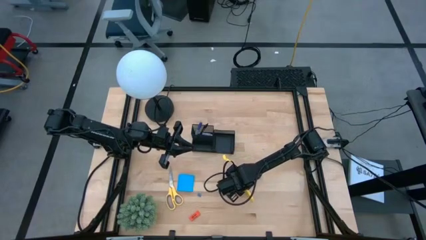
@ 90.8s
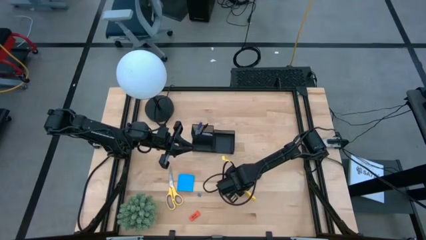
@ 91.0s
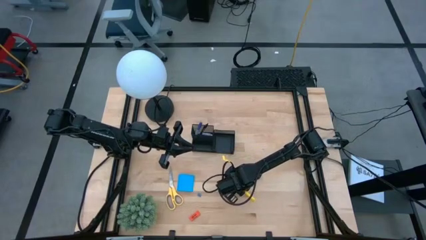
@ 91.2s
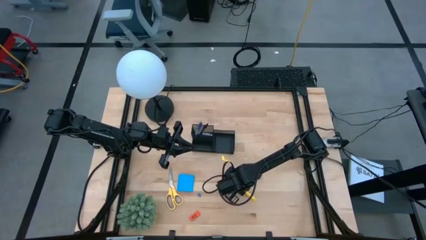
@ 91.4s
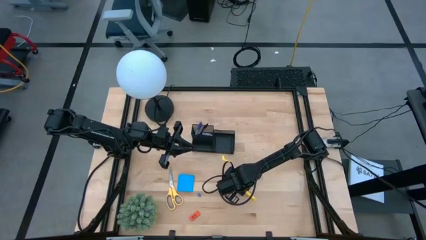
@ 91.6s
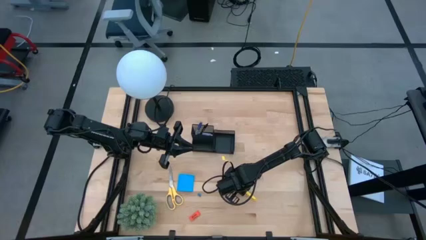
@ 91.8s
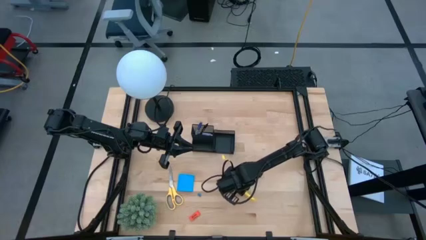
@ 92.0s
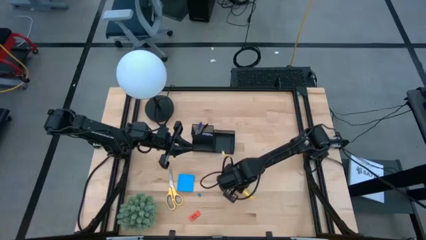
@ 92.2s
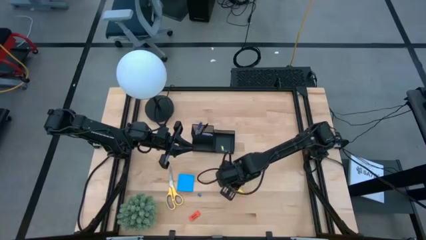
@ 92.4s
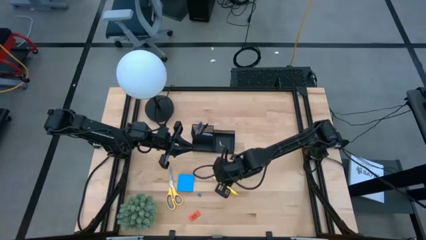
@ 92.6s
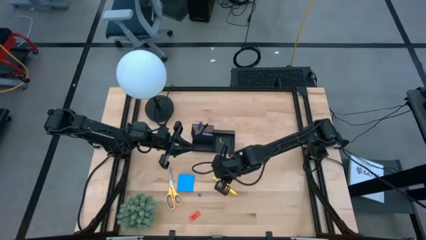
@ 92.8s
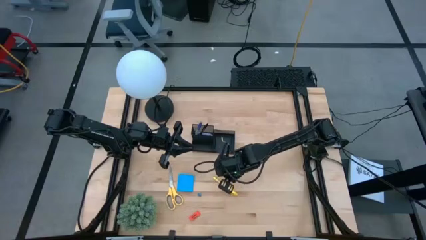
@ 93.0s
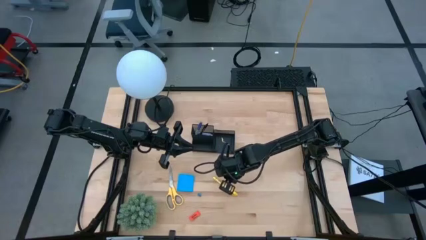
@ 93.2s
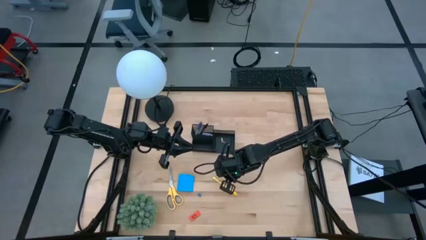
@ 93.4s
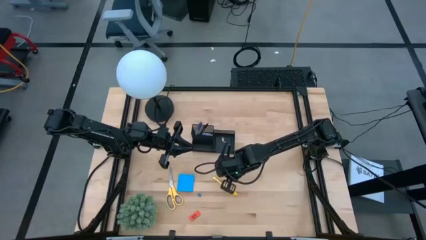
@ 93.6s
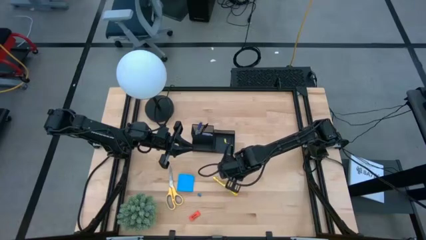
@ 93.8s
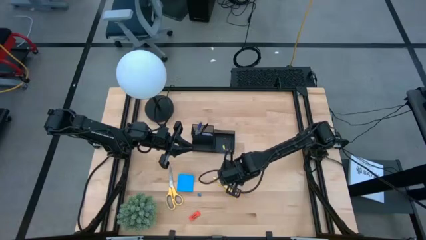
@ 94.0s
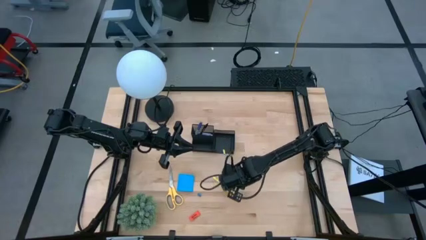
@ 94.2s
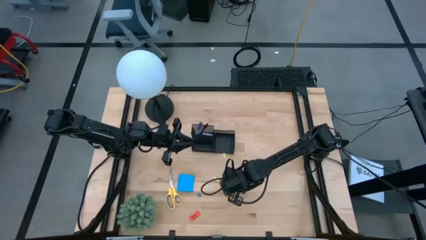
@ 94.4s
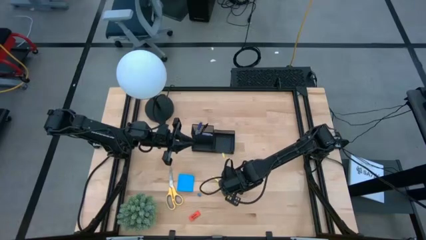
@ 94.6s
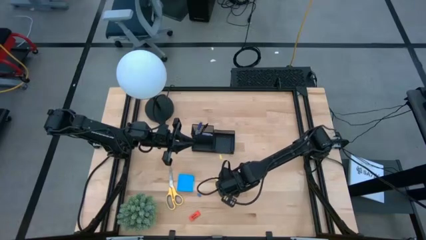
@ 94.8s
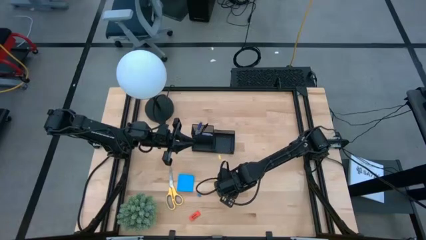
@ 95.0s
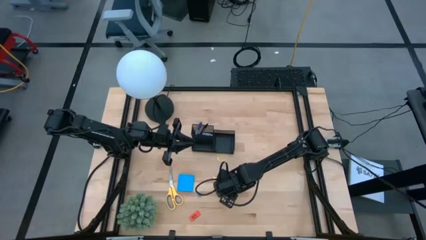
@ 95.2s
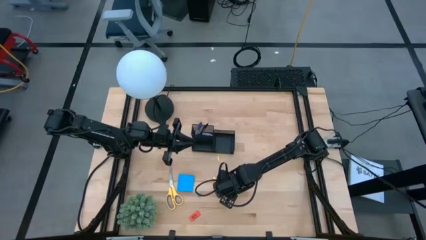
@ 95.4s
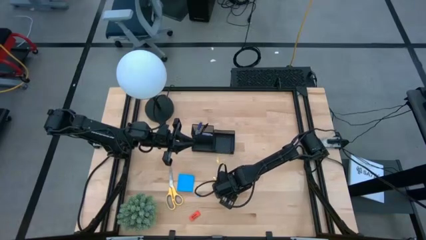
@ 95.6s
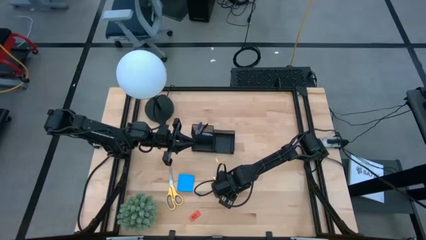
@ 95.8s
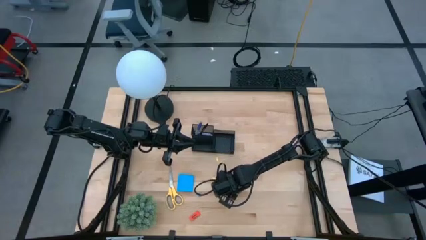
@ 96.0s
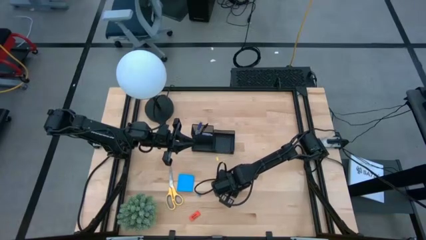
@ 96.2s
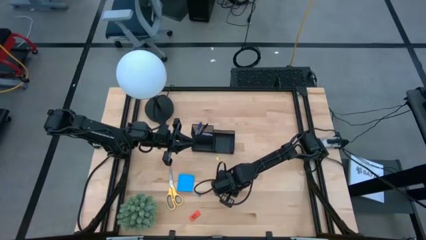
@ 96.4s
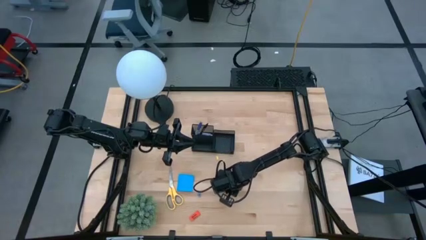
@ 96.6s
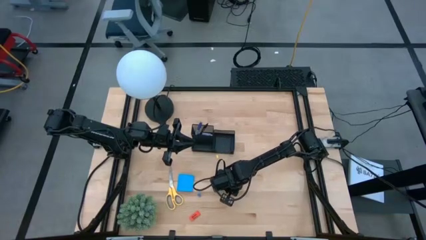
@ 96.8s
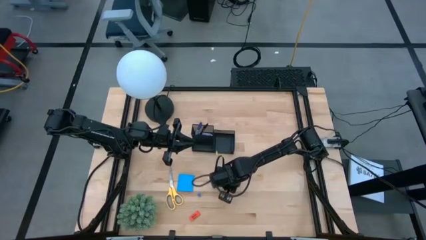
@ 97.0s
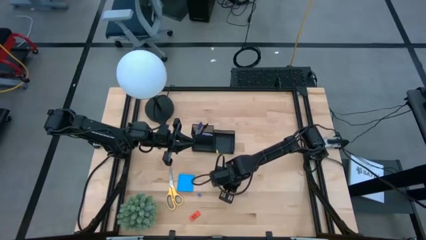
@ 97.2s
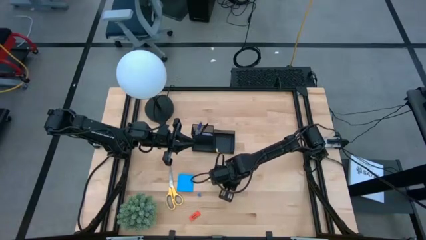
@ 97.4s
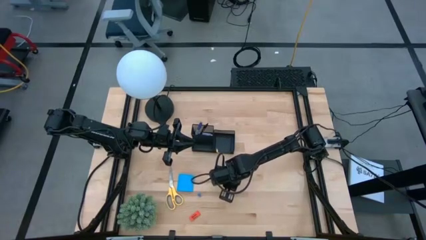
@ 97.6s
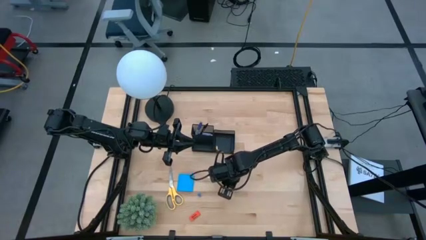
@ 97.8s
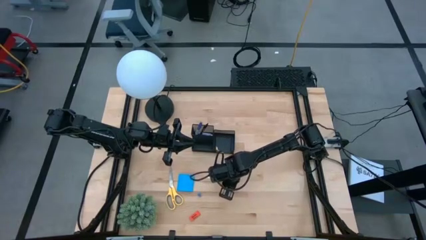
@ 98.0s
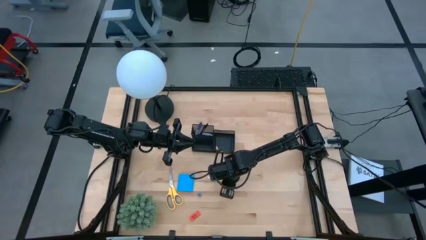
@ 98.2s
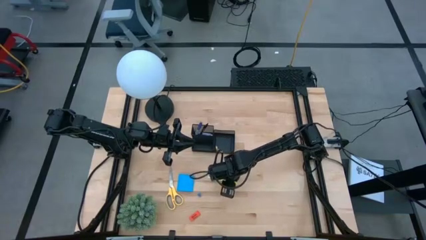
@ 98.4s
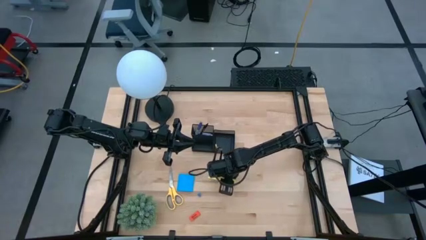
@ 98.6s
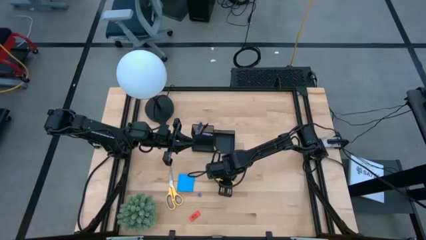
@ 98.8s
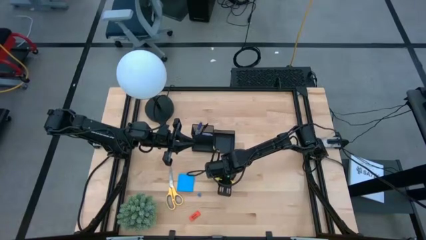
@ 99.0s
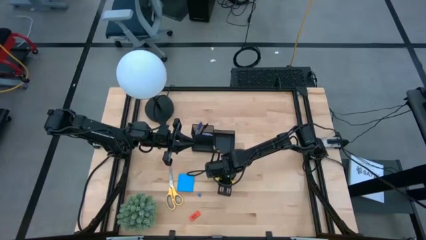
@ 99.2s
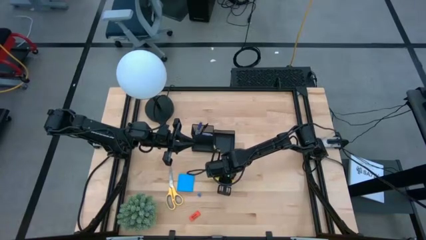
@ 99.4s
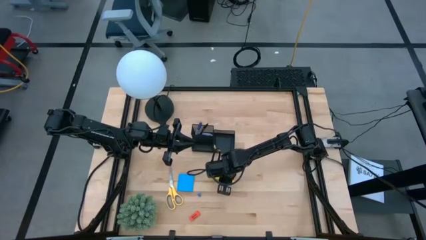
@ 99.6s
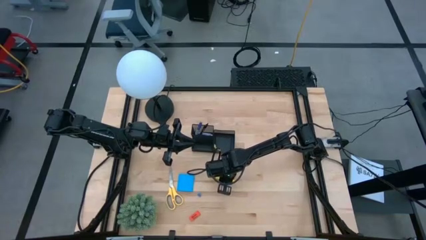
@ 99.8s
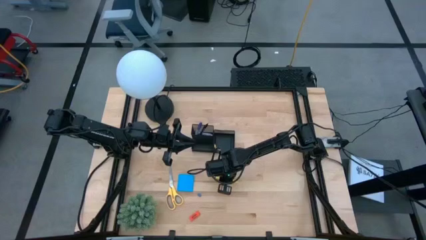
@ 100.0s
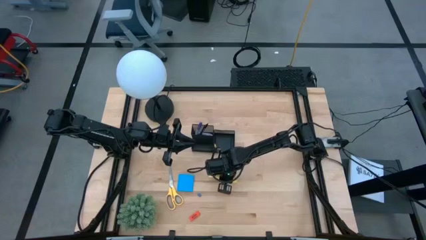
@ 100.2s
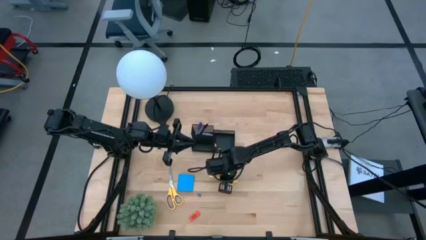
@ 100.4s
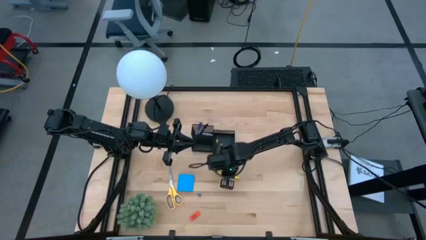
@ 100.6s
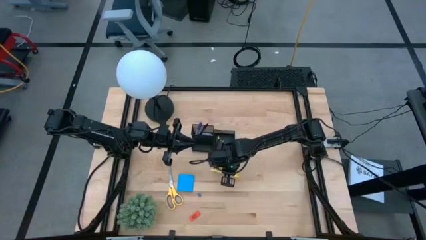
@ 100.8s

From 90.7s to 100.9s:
Task: Pick and place office supplies into organizer
Put the yellow pen into the black desk organizer

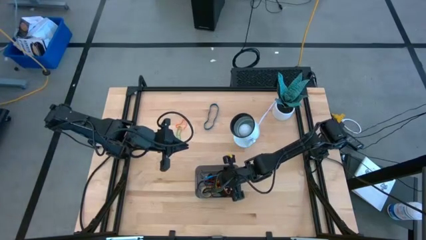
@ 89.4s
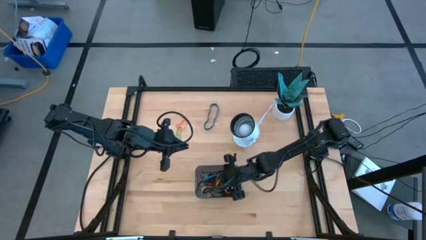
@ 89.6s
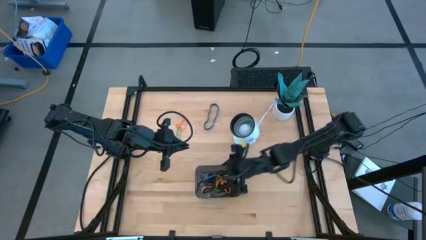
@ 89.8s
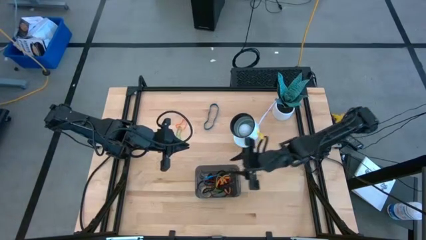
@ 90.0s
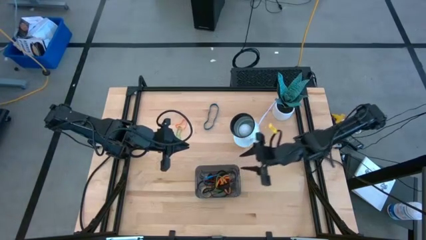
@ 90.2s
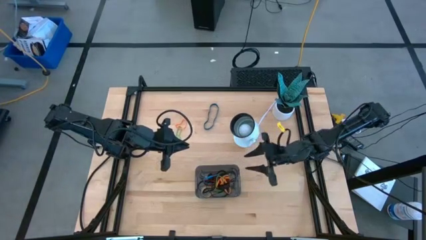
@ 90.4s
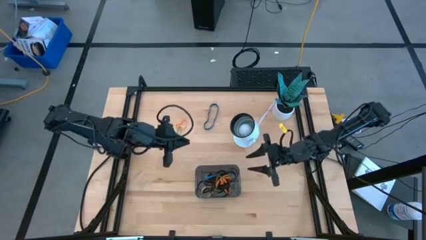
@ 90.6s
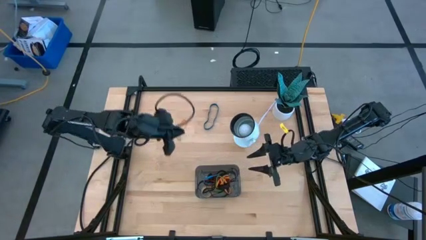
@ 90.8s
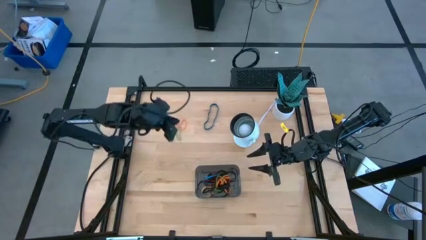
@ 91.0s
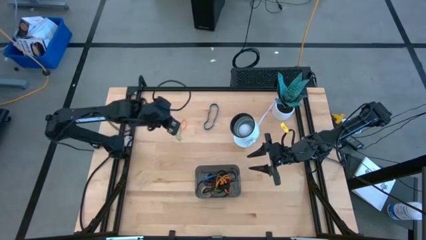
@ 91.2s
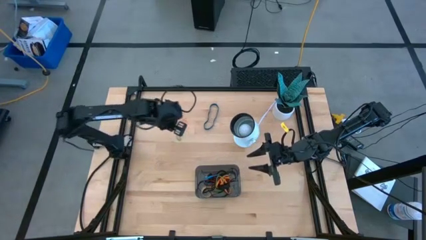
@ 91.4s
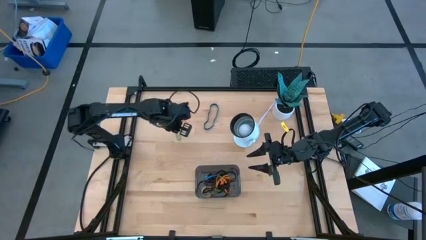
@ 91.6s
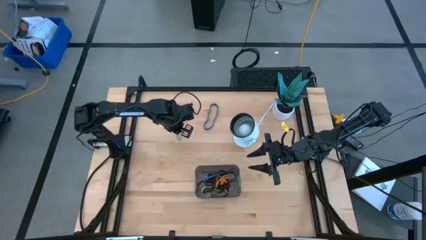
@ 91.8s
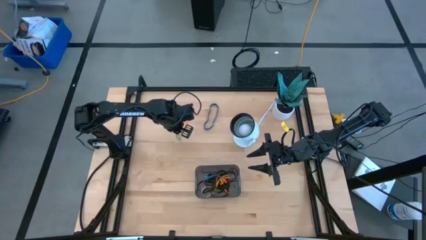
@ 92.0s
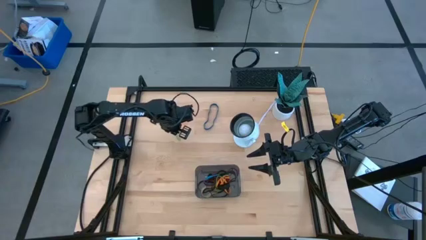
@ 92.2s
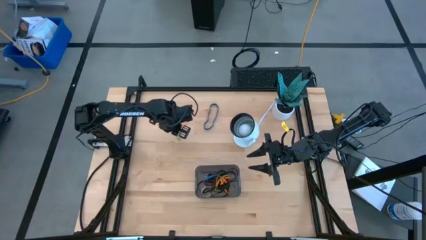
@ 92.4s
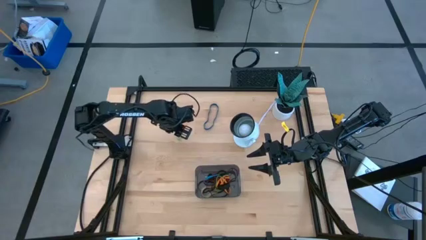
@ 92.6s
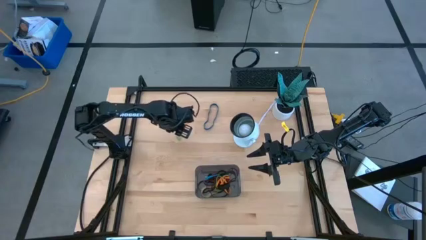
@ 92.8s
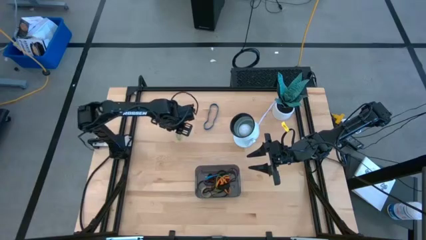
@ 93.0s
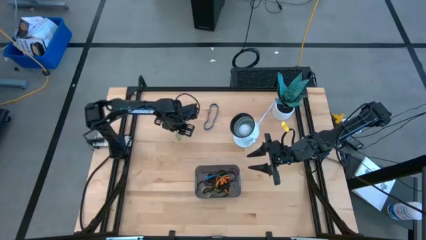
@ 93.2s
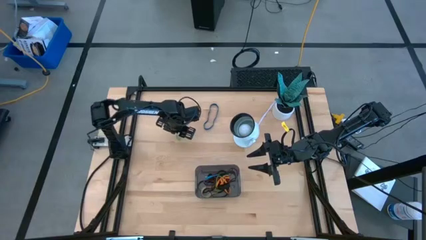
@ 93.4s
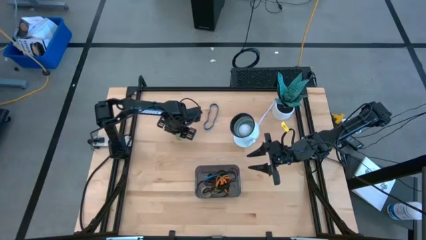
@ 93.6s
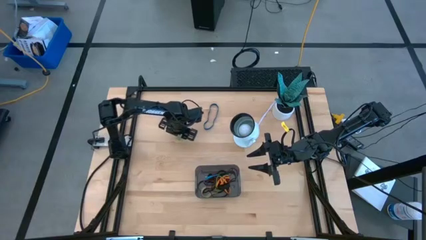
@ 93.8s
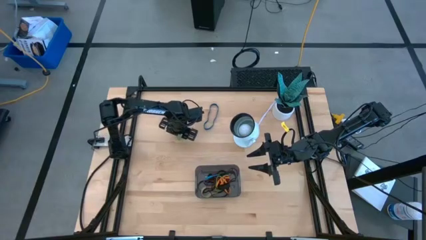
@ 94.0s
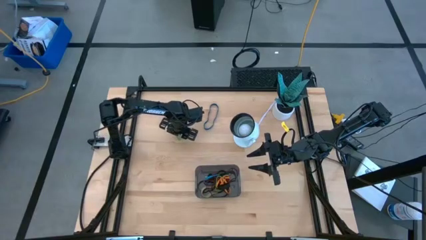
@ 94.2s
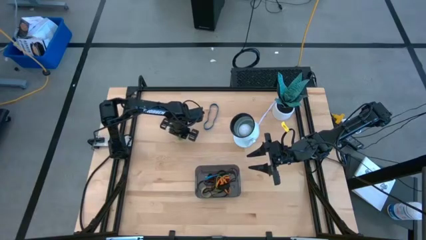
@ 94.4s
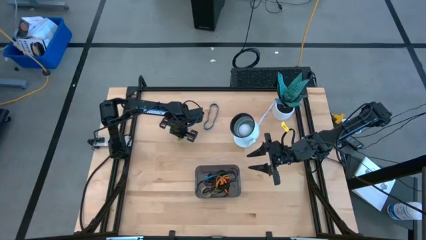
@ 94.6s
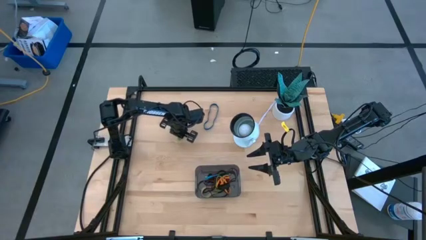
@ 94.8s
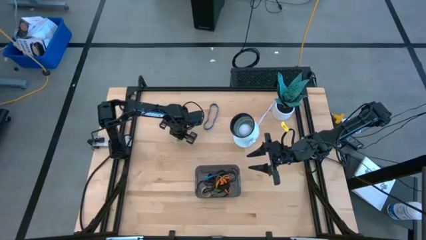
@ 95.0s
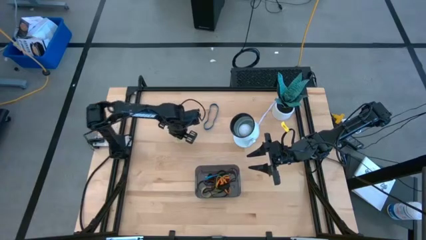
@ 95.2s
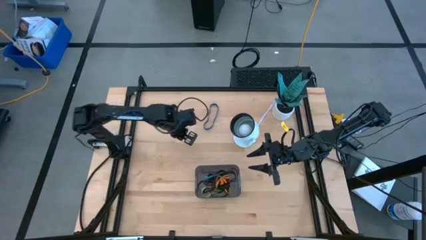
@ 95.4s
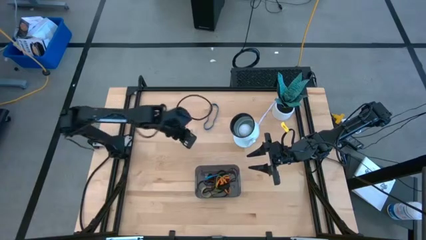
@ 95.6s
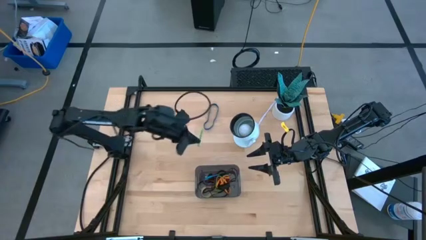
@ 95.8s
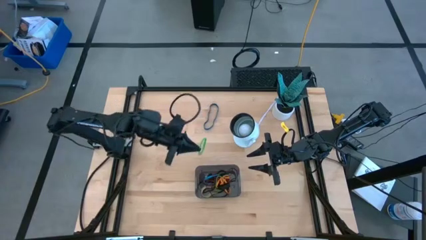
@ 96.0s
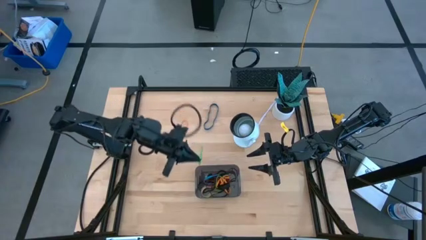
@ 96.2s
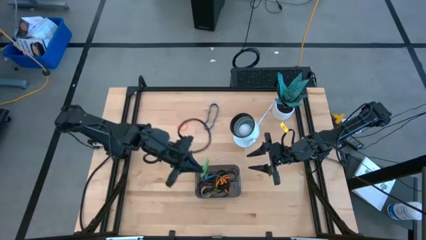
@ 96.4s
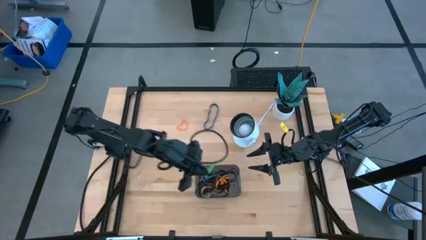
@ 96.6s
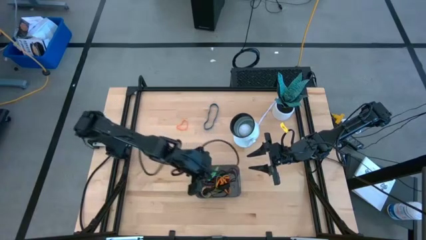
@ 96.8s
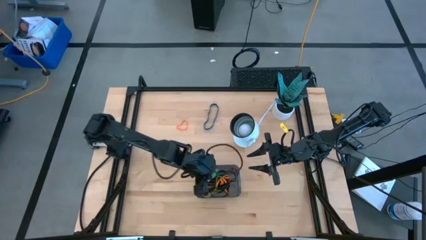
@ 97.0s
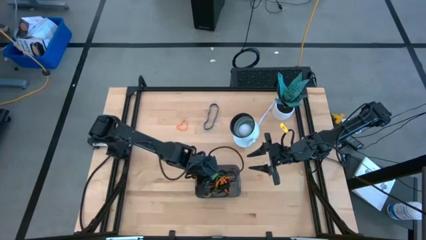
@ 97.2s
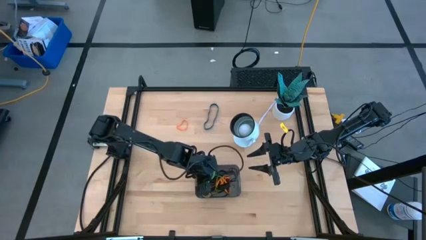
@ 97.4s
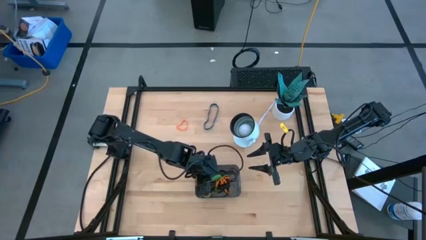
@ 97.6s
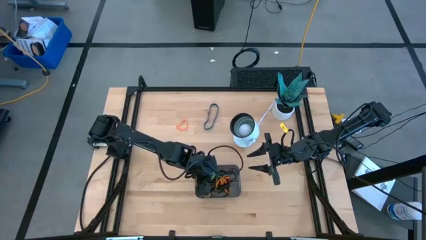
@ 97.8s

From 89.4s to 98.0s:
Task: Pick and place rubber bands into bin
Put the green rubber band into the black bin
